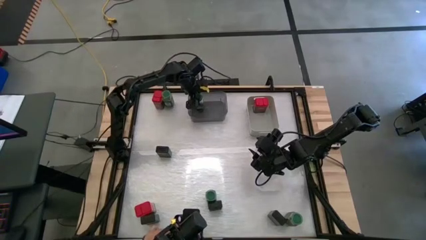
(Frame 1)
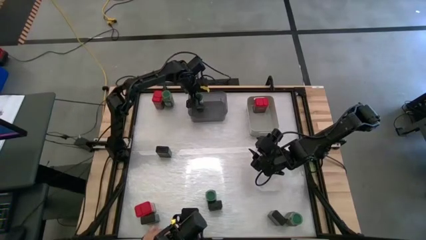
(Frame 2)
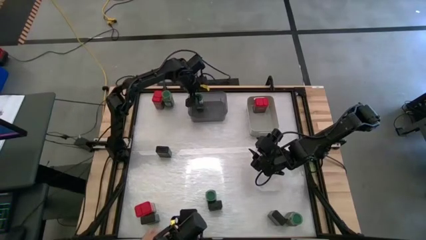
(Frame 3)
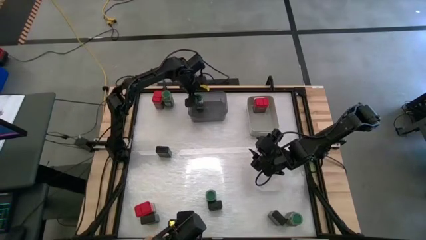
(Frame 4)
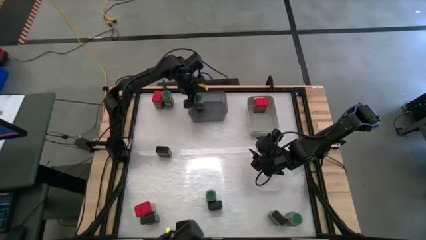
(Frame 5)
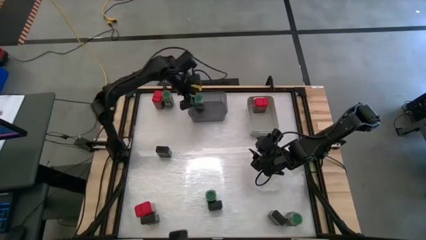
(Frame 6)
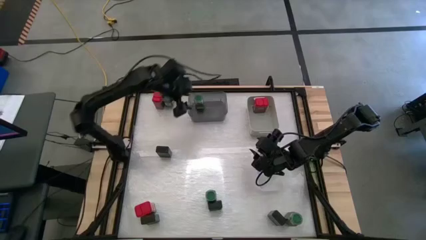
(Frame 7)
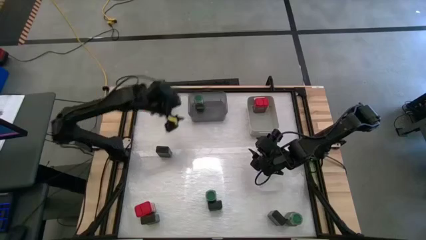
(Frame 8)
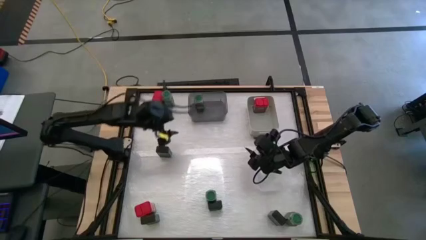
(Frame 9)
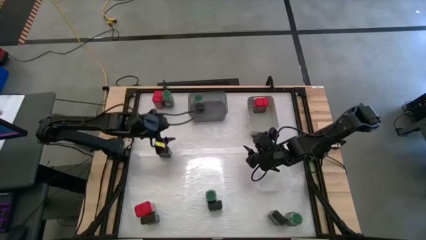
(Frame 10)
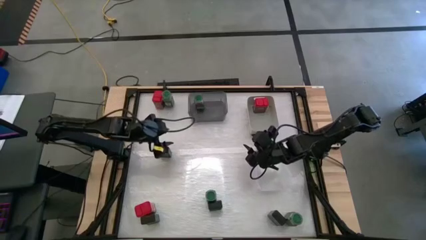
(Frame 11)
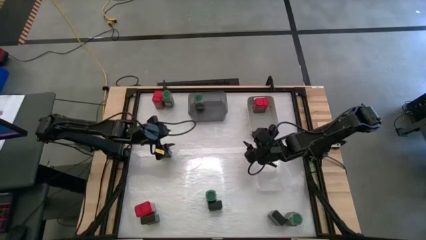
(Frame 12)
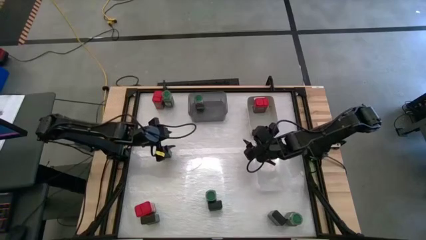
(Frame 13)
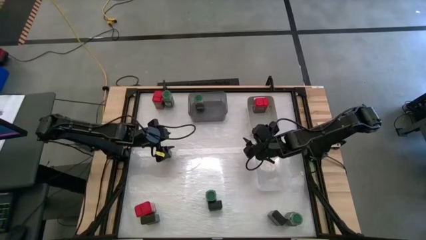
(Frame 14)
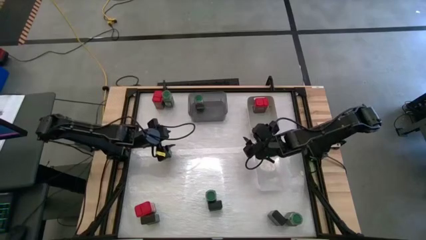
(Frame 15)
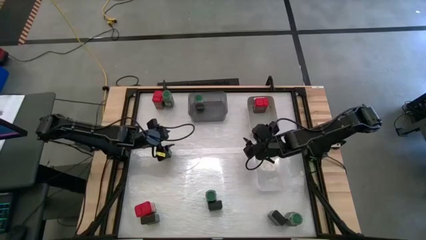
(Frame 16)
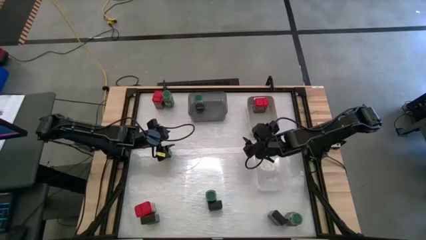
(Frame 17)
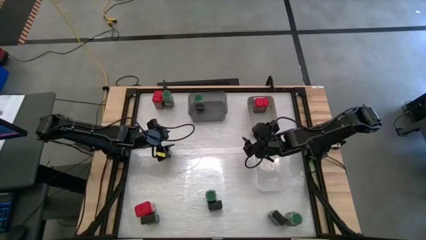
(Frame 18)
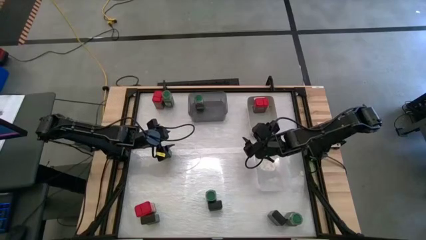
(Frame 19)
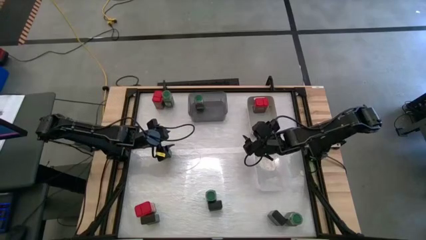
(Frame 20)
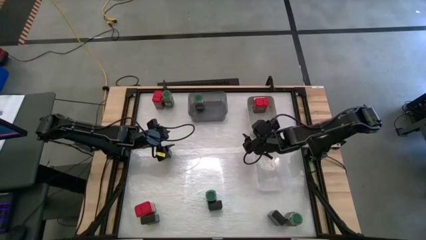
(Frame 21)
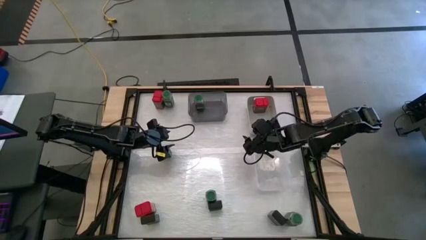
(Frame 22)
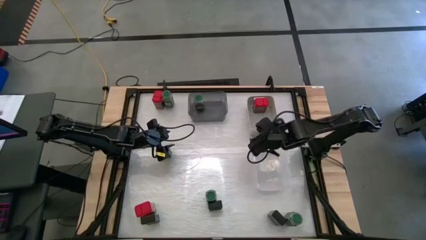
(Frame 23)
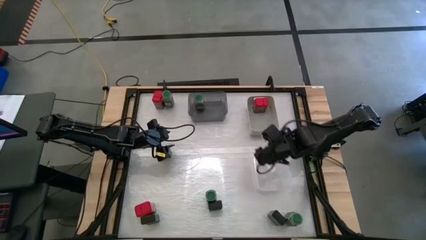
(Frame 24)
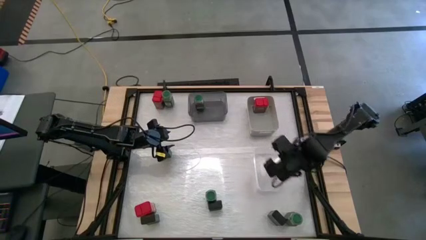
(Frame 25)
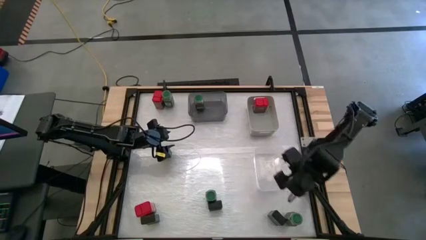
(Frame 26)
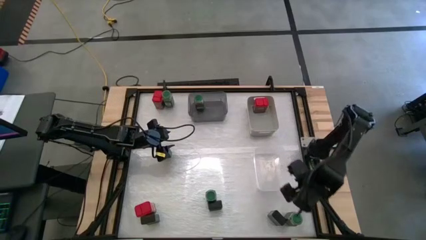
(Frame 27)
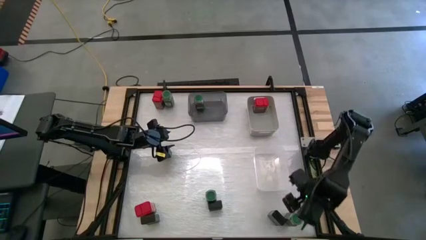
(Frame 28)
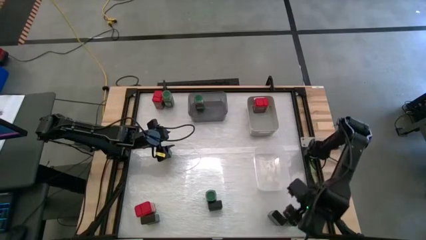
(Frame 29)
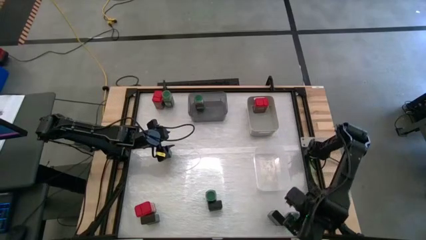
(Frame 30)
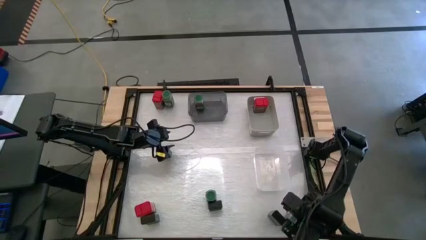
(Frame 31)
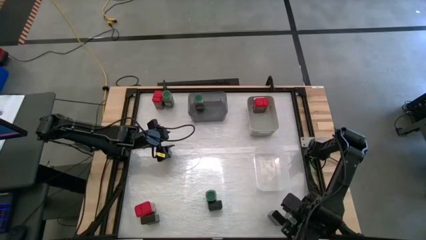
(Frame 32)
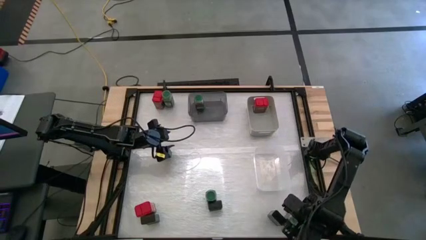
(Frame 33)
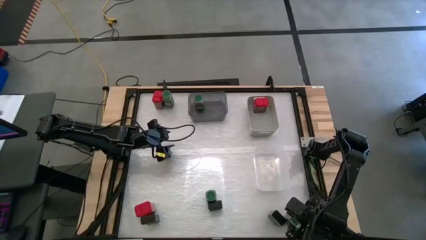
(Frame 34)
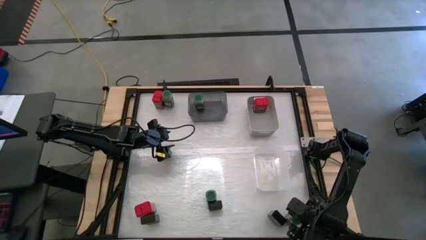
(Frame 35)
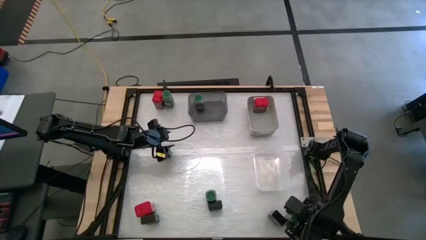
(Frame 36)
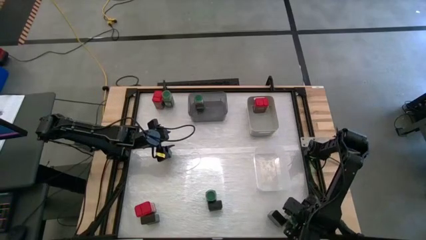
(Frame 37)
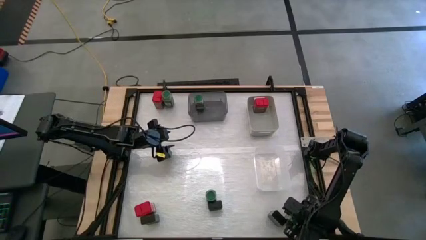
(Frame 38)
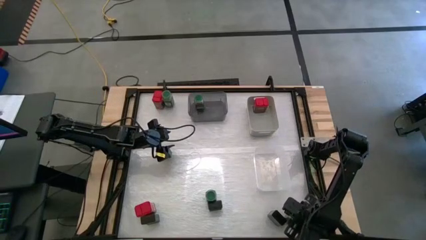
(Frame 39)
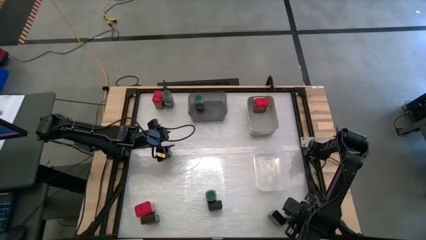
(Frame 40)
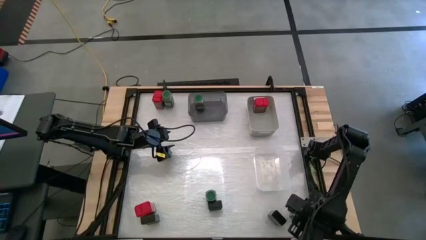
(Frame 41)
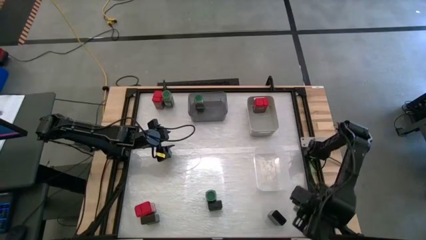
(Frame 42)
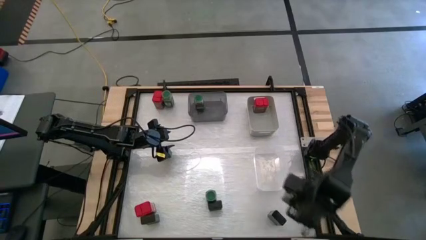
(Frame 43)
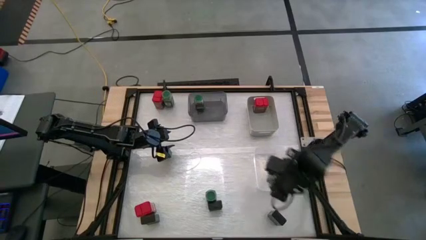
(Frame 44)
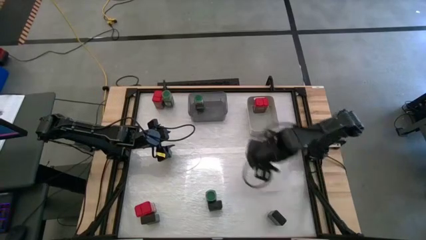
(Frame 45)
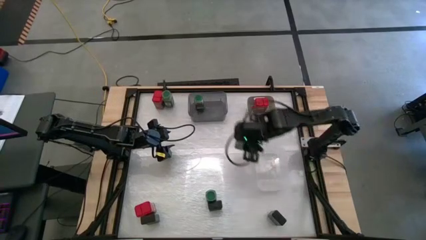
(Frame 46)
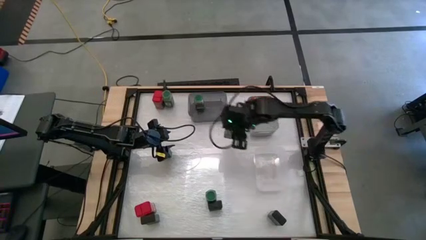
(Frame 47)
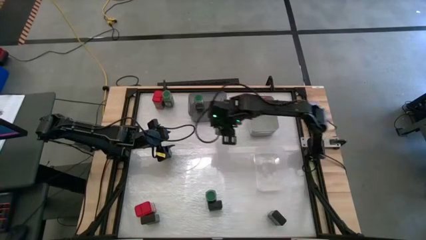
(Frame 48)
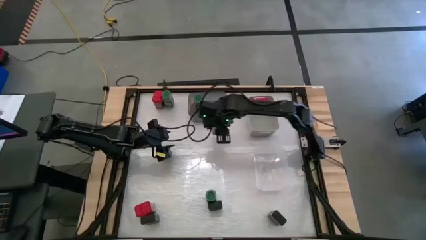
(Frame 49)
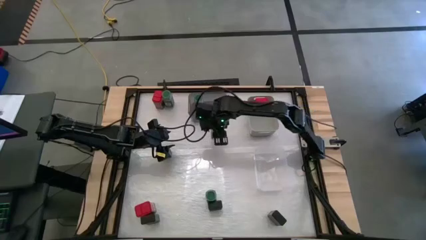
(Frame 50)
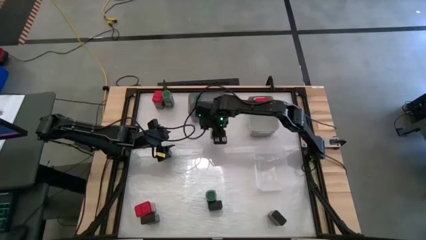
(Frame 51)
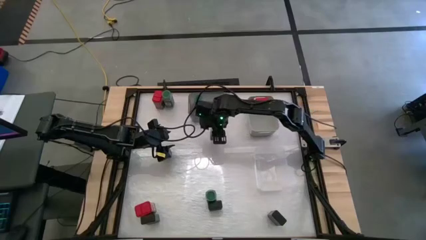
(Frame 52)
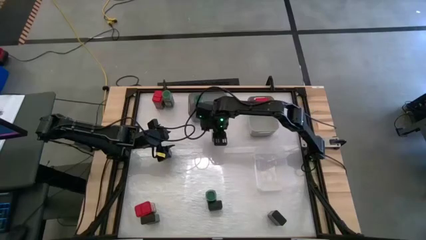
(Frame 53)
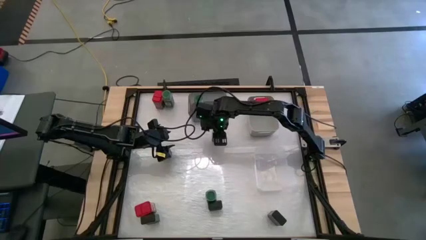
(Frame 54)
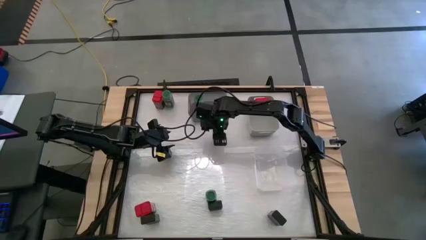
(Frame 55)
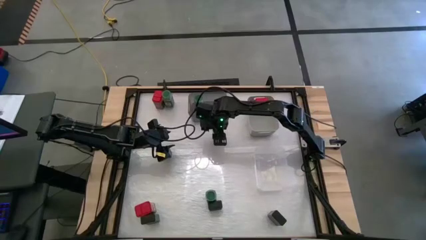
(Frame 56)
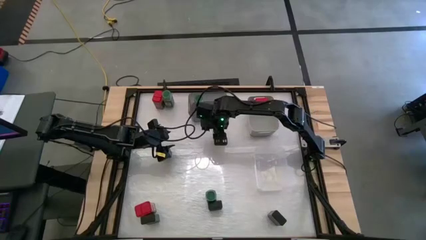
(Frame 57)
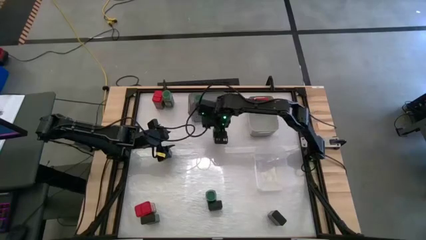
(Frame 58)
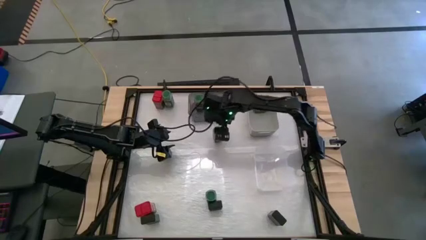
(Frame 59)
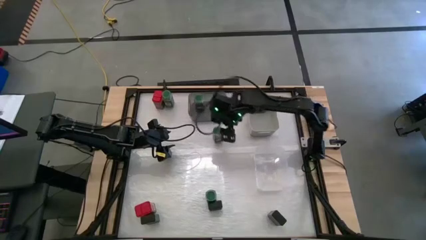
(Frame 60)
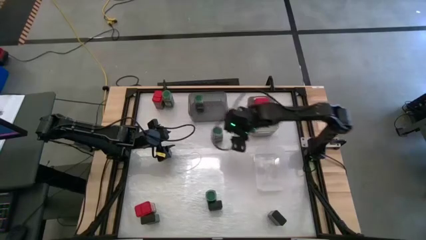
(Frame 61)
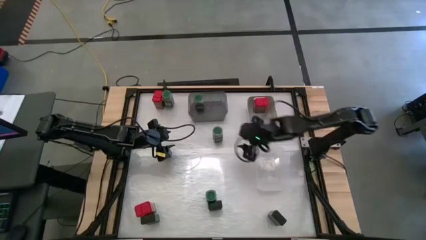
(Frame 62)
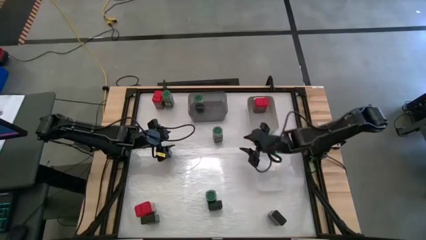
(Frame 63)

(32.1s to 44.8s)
Task: Sort spices by type
Move the bottom right green seasoning bottle to the center of the table
